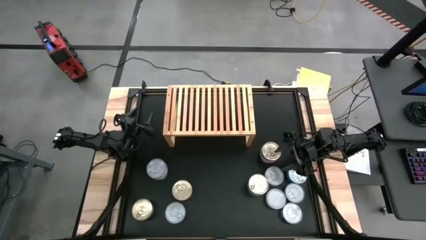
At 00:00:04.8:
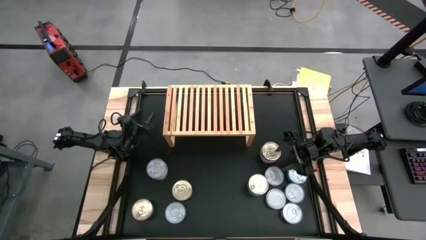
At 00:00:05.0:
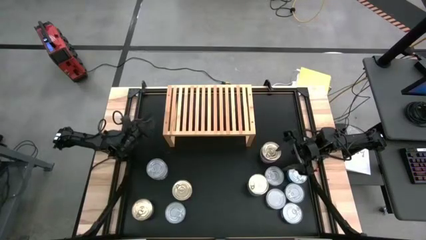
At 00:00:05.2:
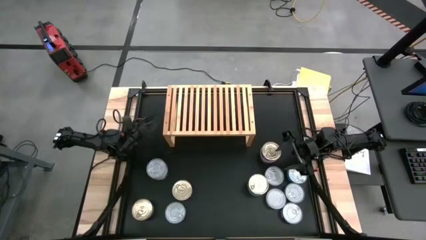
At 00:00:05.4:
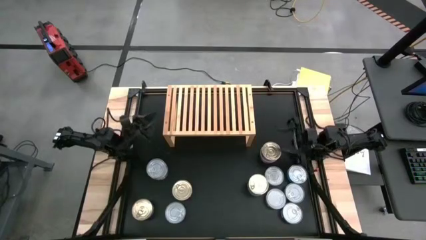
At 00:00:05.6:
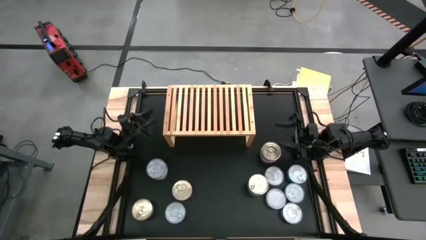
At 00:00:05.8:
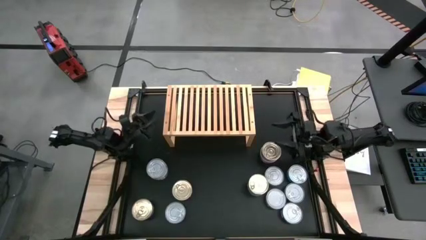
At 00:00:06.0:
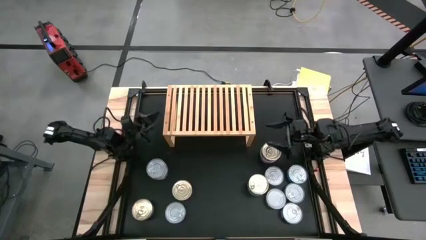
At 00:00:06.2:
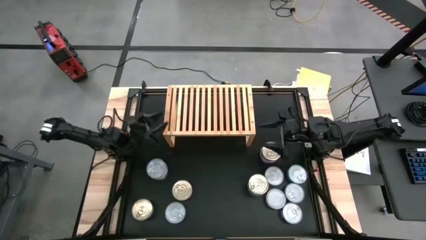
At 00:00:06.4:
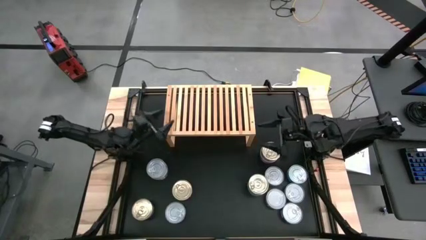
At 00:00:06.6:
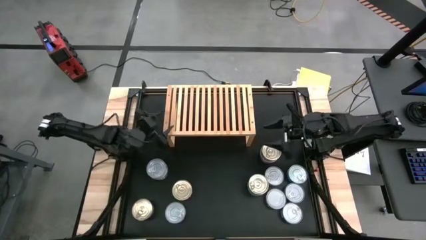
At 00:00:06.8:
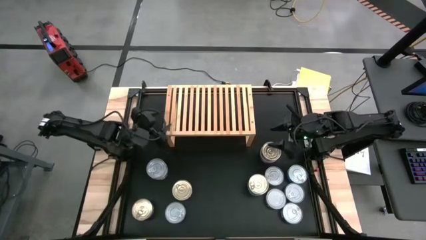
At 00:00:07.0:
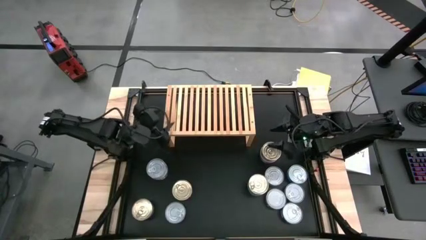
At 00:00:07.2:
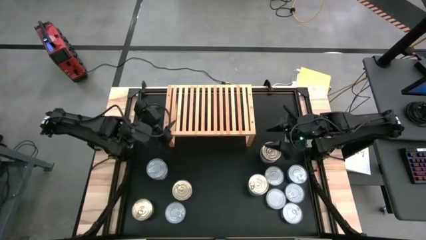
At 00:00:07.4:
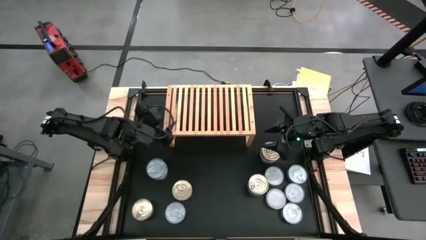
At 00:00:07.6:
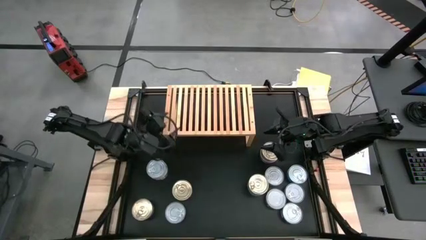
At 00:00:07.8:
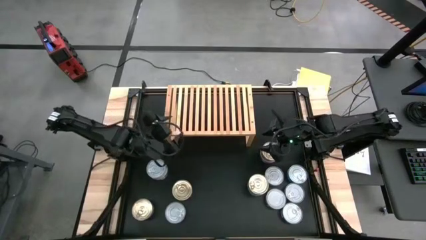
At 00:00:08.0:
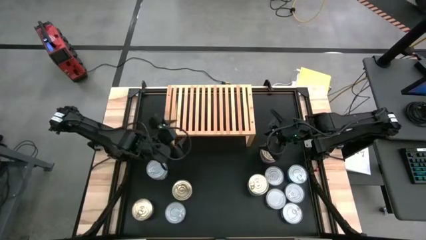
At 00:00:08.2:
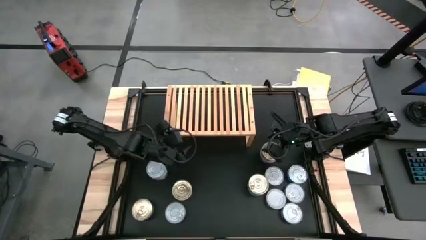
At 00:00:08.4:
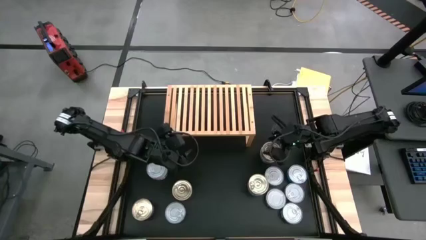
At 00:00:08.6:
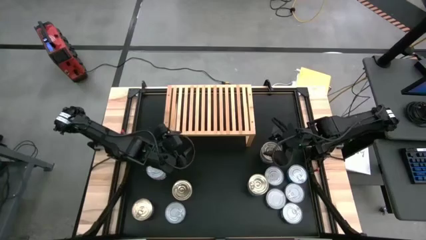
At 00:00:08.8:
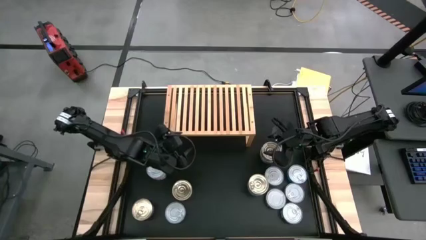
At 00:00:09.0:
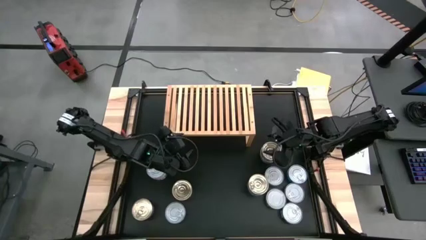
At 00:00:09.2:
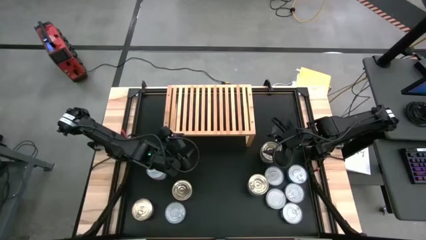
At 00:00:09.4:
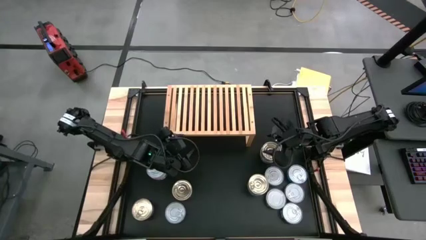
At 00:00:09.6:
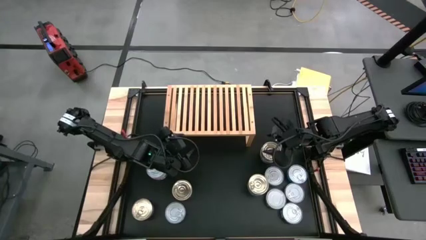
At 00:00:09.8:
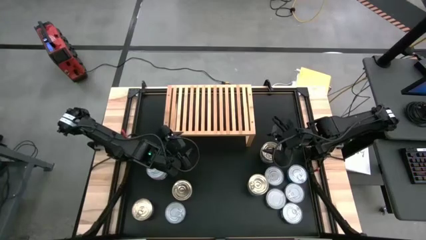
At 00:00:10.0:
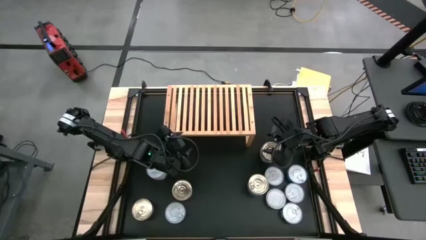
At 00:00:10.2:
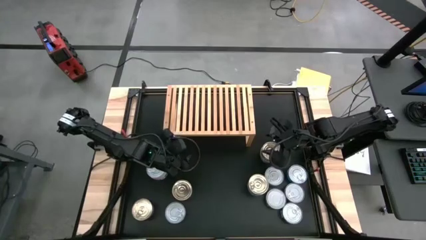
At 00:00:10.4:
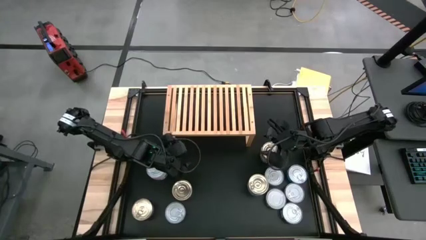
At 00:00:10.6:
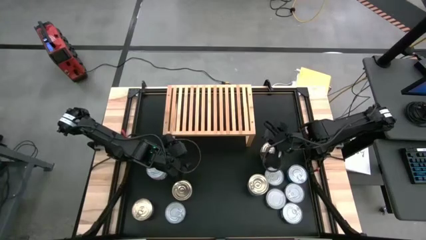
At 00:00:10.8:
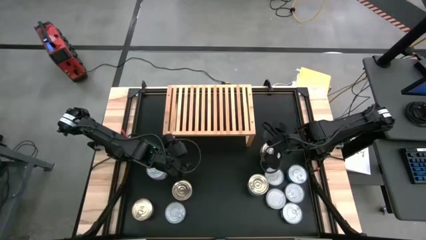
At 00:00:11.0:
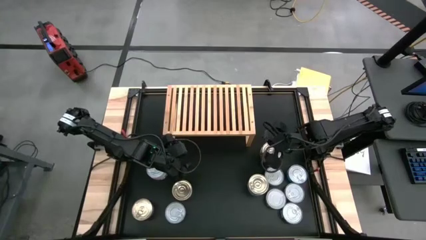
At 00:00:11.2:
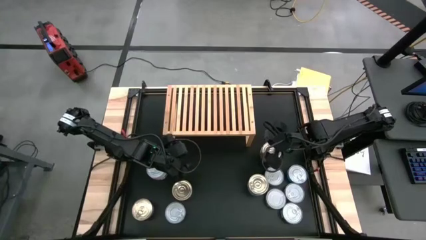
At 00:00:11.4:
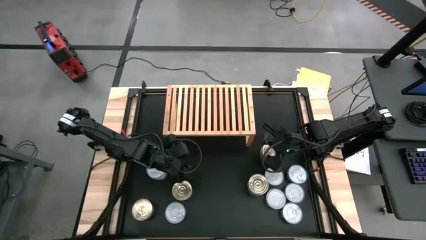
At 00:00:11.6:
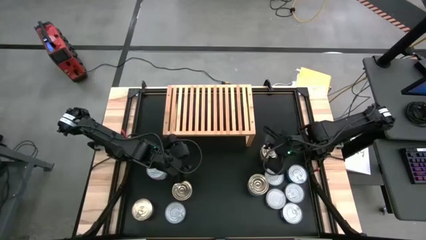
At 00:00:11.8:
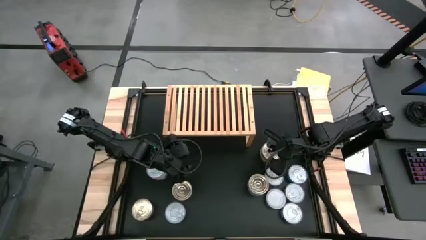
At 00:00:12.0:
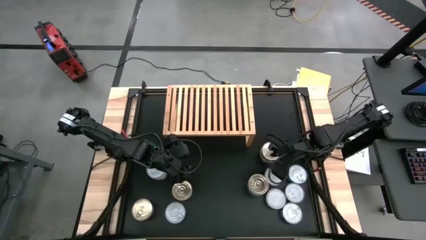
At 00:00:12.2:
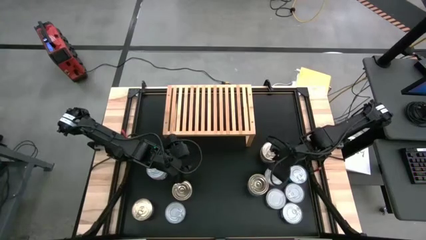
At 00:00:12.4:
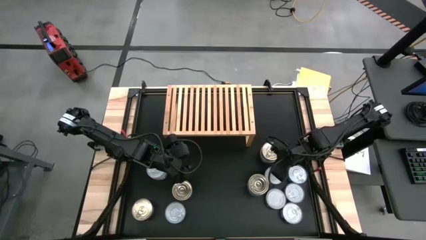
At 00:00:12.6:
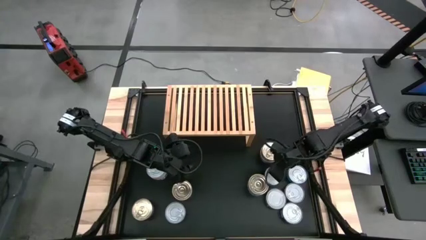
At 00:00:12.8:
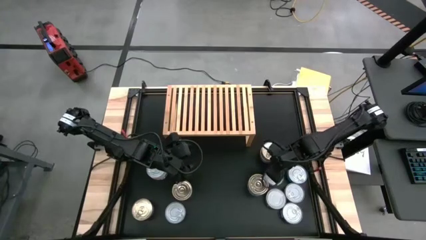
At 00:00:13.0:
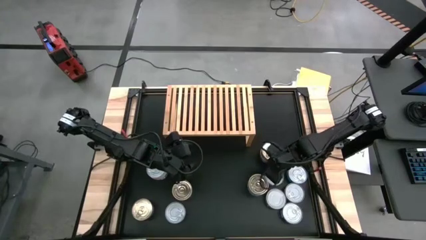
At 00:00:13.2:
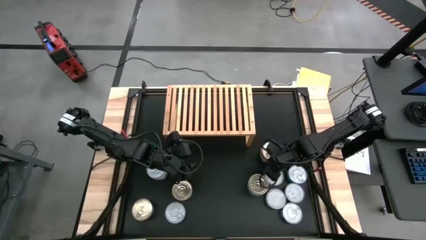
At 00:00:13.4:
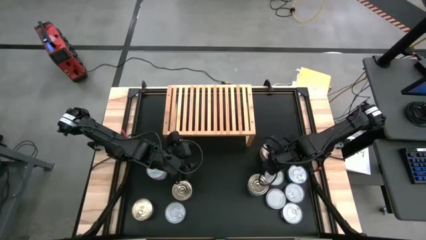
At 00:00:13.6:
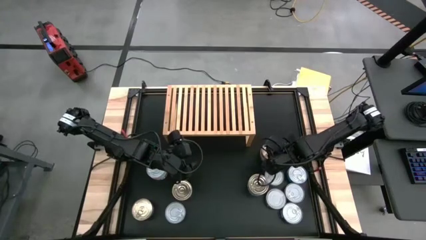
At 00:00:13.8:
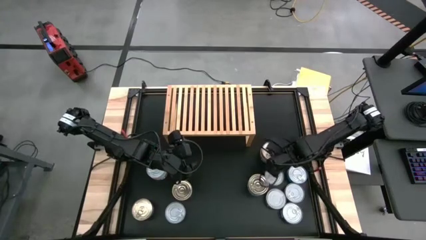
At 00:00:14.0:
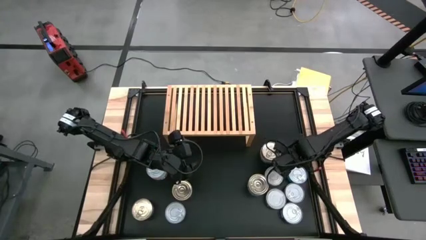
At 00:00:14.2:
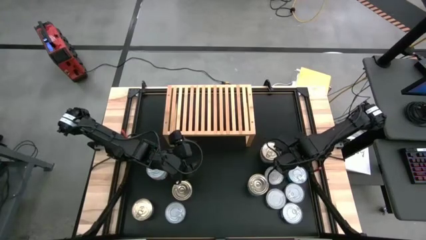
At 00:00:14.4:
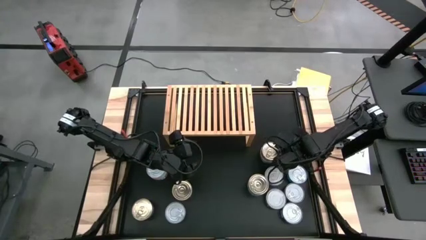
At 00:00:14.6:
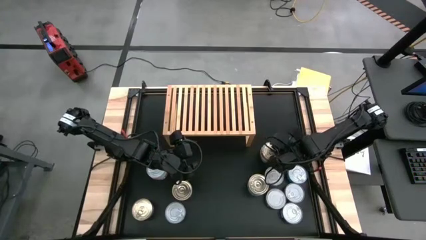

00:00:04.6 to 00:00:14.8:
Task: Stack canned seafood by type on shelf
Put the blue and pink tuna can on the shelf

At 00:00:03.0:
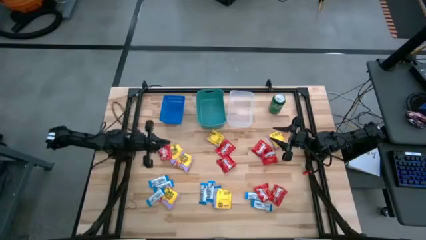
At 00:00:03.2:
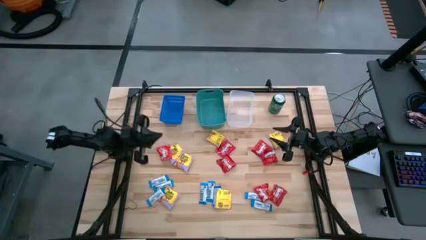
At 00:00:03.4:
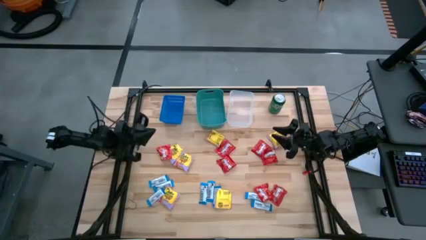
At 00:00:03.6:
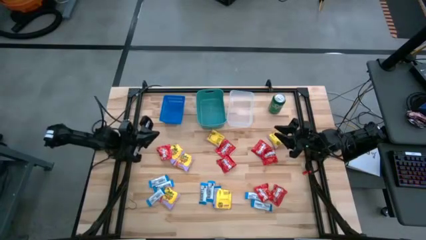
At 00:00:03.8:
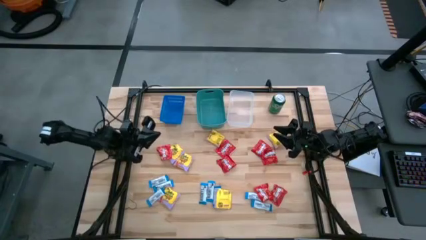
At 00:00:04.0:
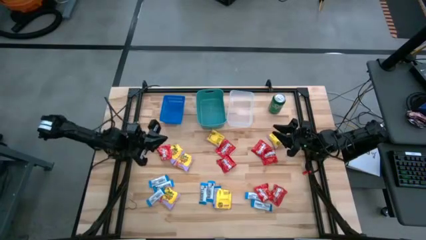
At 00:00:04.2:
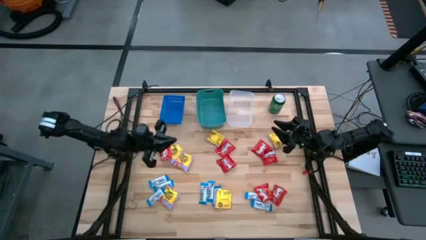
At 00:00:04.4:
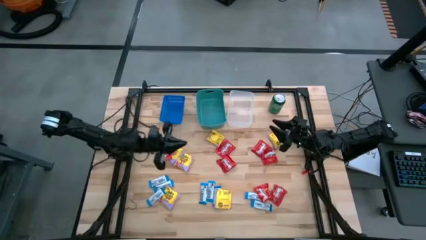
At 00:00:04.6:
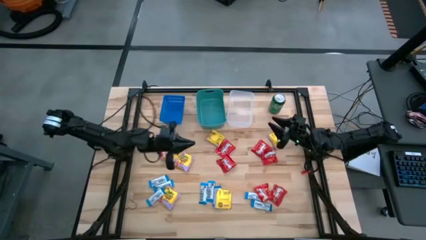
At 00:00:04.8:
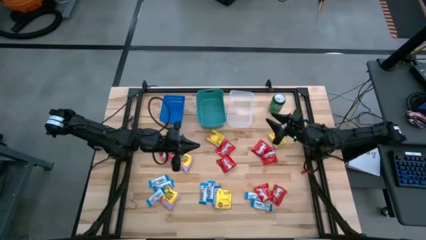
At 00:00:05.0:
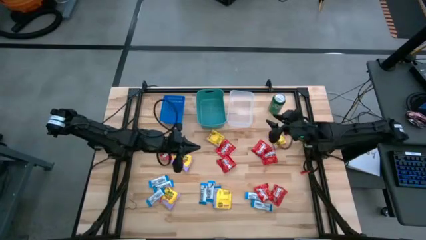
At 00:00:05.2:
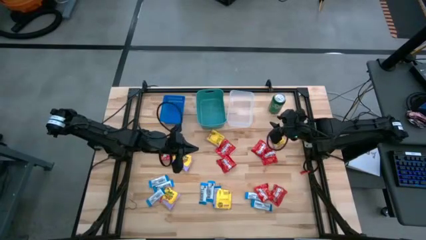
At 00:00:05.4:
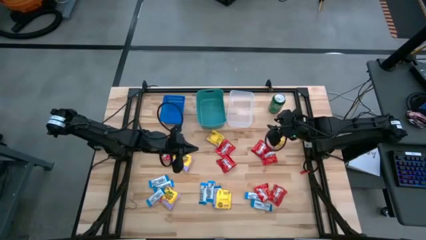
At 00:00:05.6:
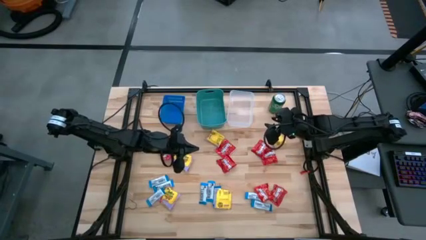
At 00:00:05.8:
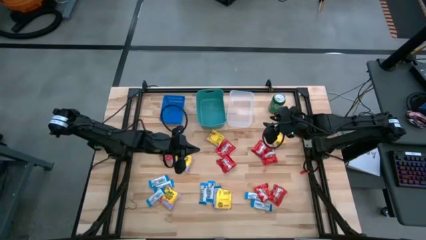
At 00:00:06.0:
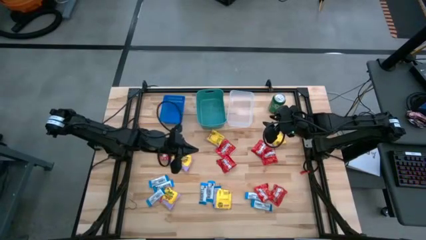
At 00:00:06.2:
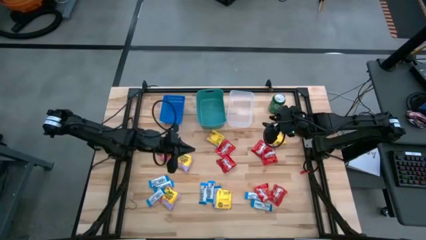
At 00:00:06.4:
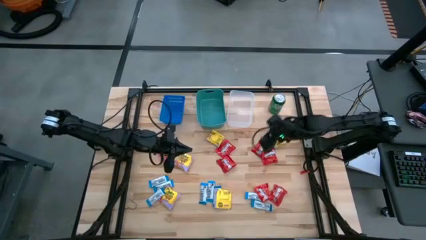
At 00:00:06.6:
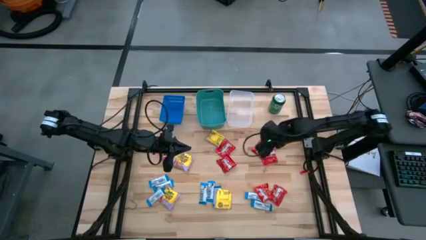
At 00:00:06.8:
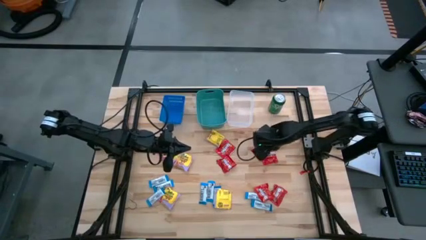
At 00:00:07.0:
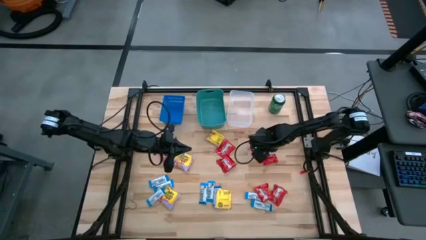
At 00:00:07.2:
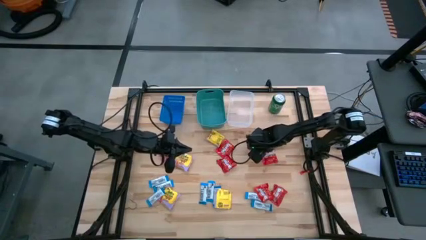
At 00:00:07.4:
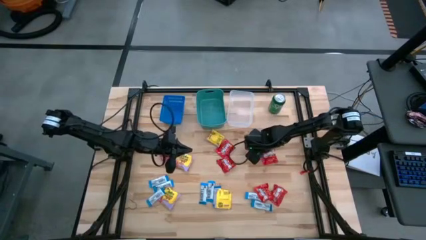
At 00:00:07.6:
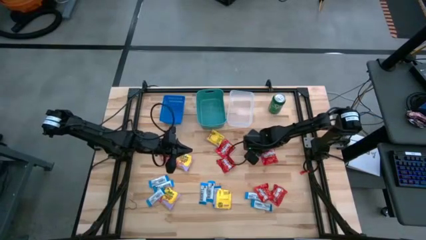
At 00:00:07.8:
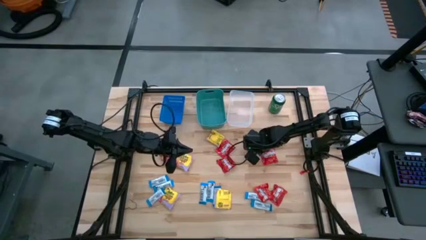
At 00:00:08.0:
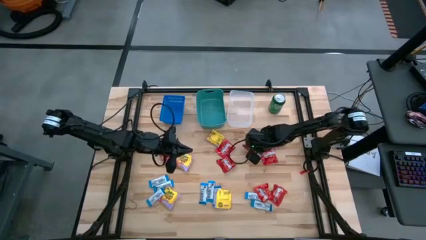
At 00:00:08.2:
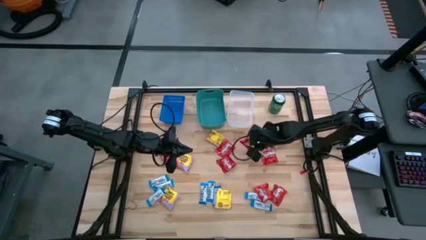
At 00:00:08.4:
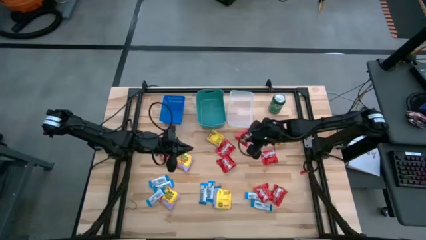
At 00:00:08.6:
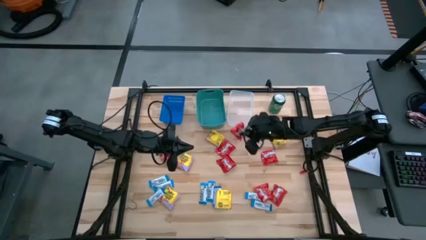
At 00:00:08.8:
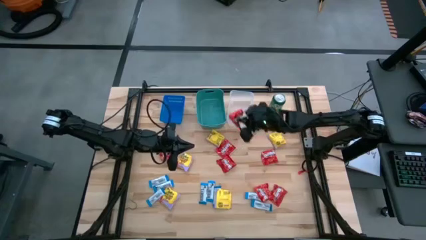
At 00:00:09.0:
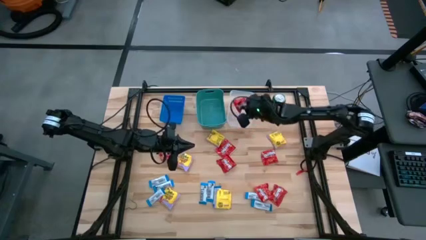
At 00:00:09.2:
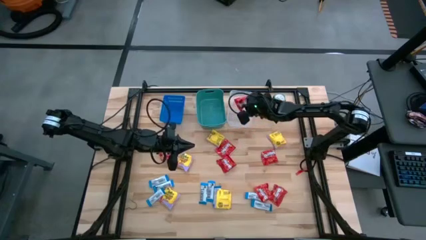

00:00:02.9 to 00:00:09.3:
Task: Sort candy
Put the red candy into the transparent bin
